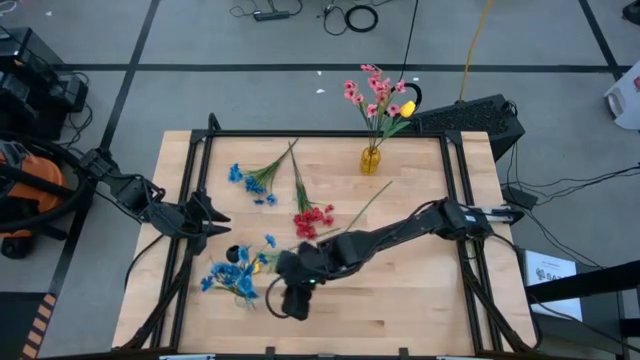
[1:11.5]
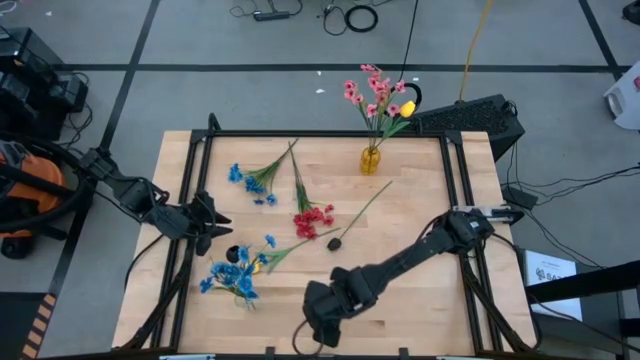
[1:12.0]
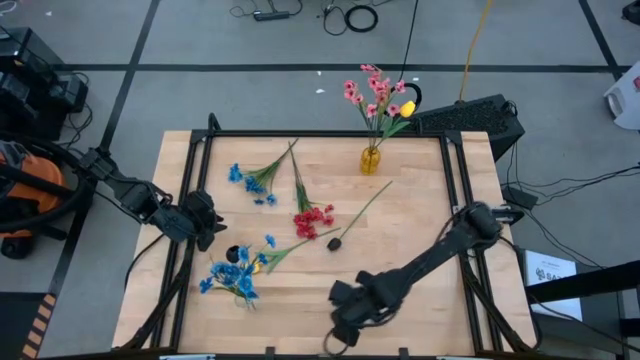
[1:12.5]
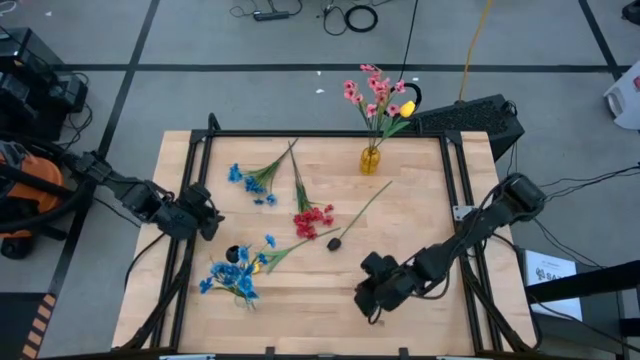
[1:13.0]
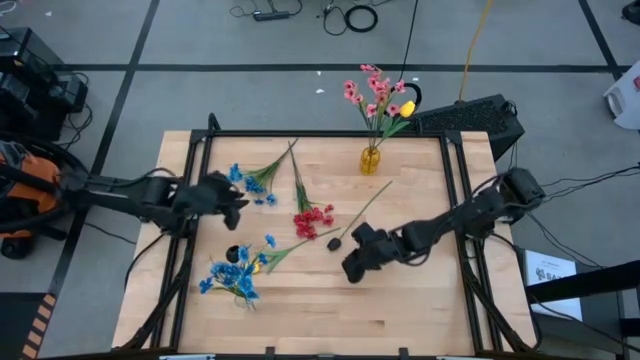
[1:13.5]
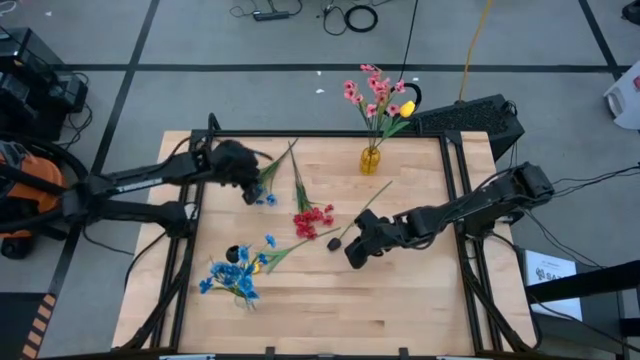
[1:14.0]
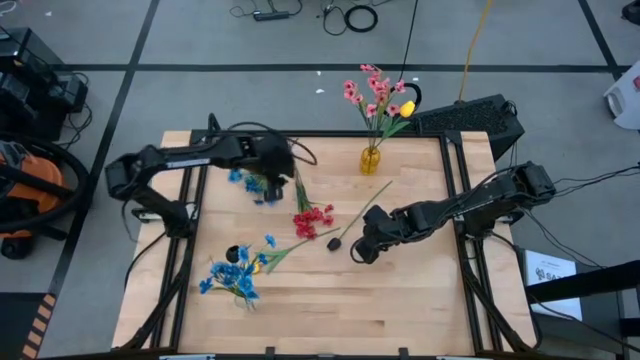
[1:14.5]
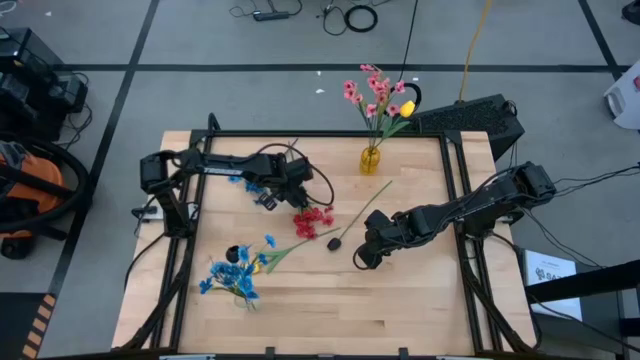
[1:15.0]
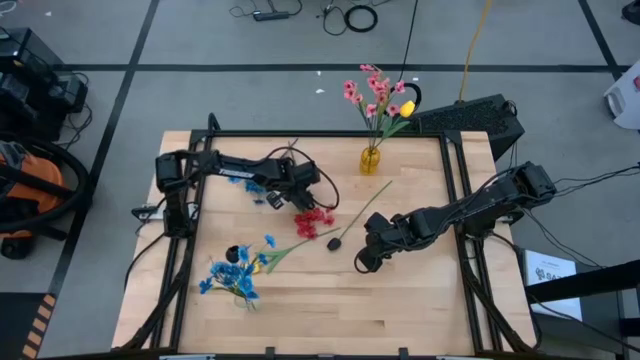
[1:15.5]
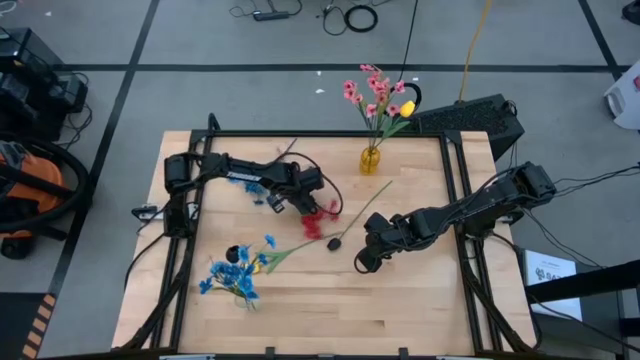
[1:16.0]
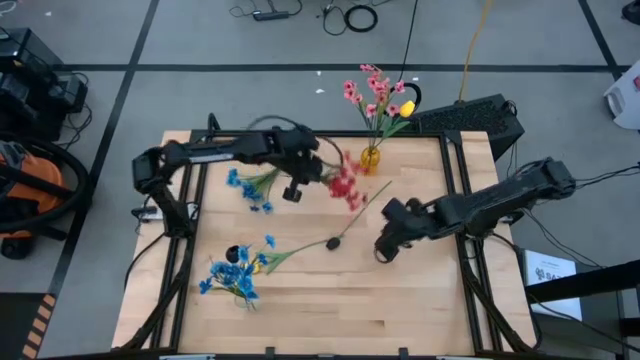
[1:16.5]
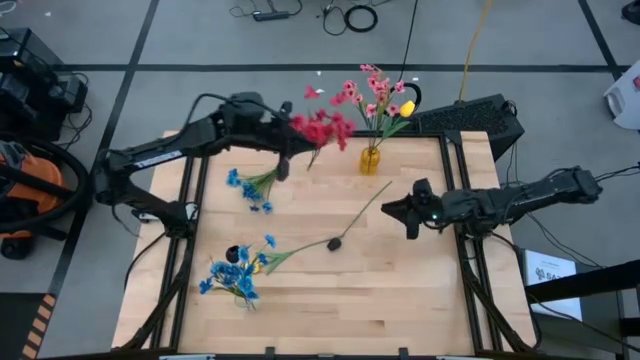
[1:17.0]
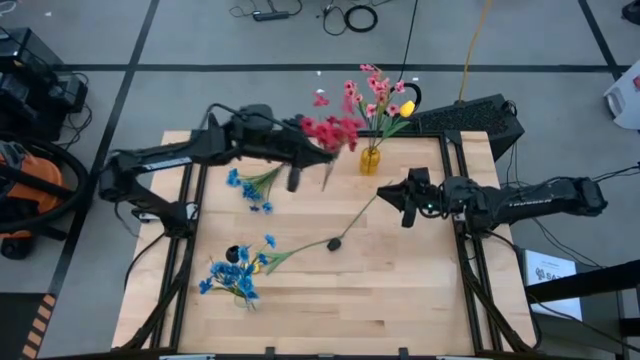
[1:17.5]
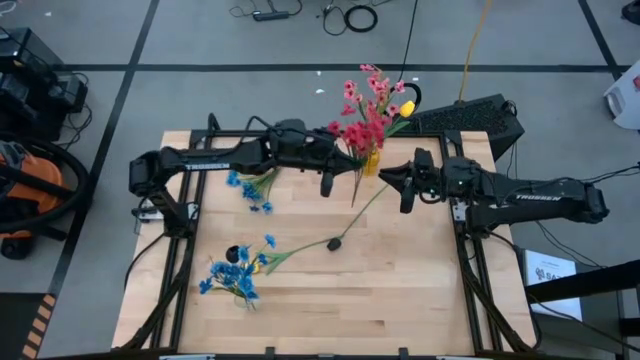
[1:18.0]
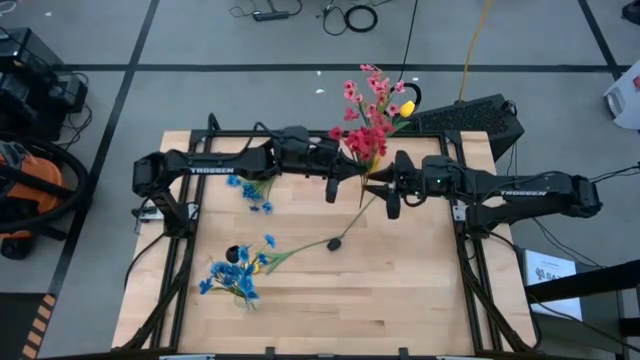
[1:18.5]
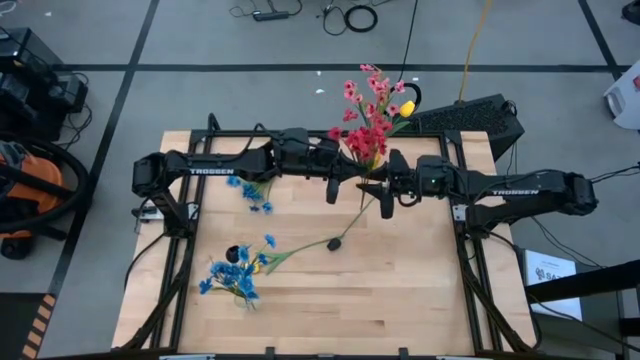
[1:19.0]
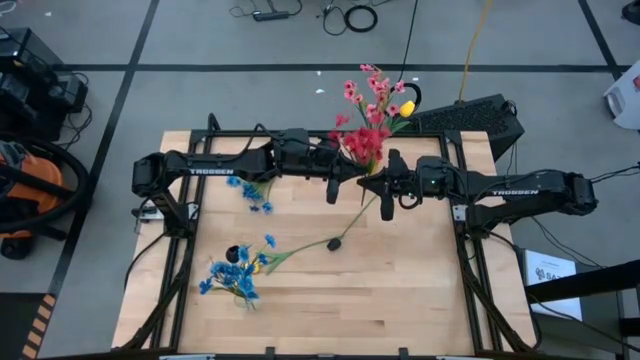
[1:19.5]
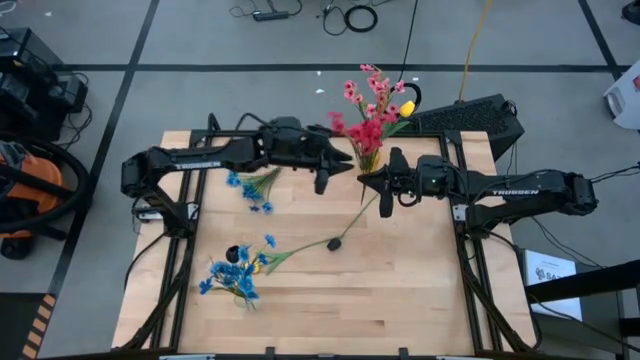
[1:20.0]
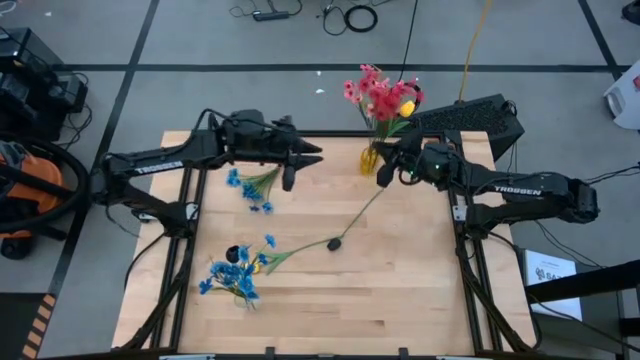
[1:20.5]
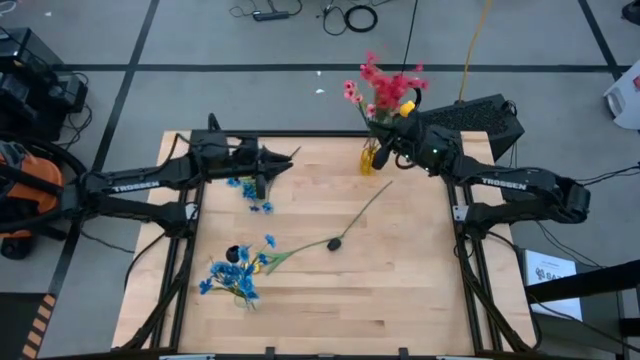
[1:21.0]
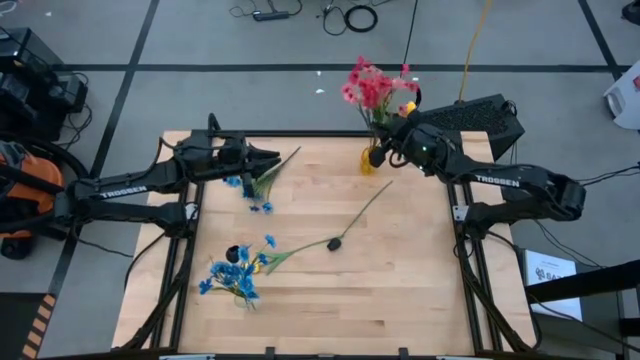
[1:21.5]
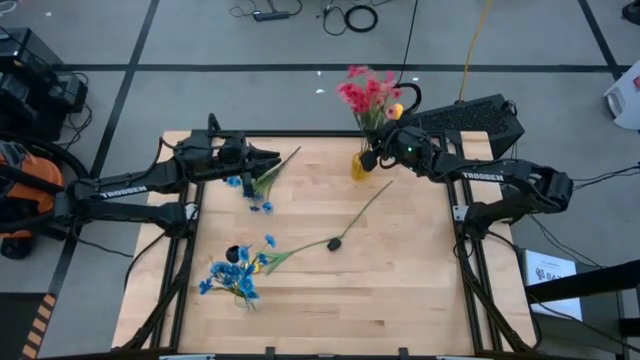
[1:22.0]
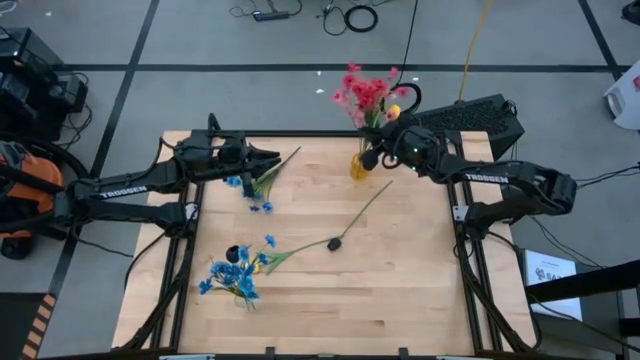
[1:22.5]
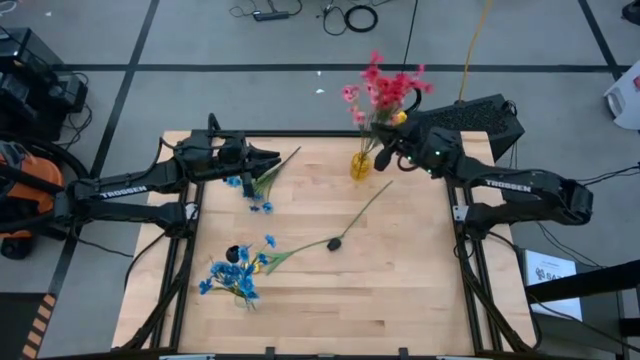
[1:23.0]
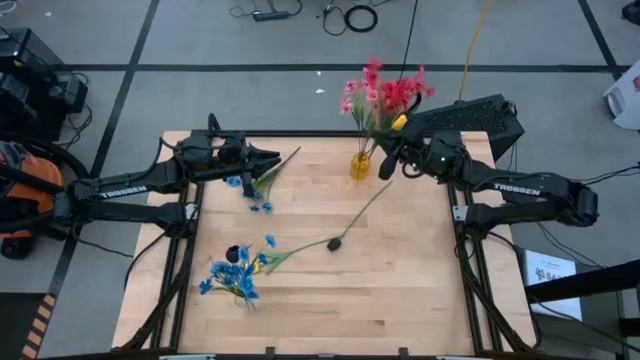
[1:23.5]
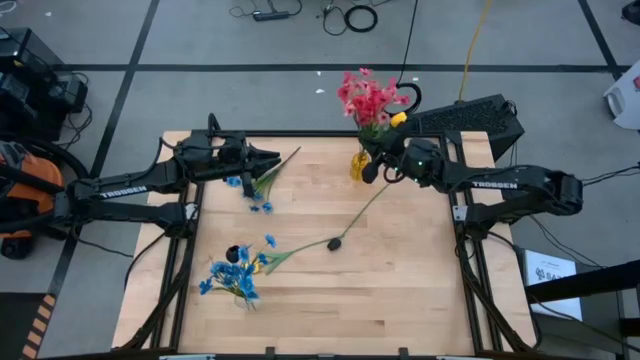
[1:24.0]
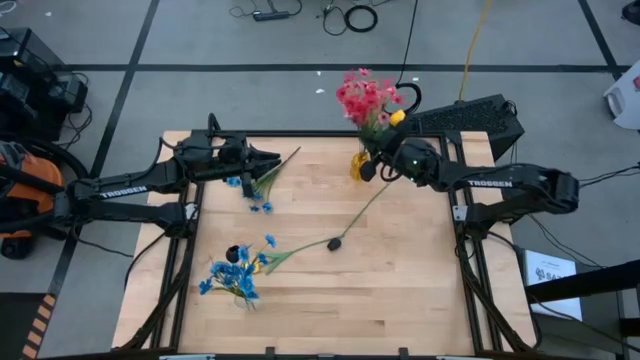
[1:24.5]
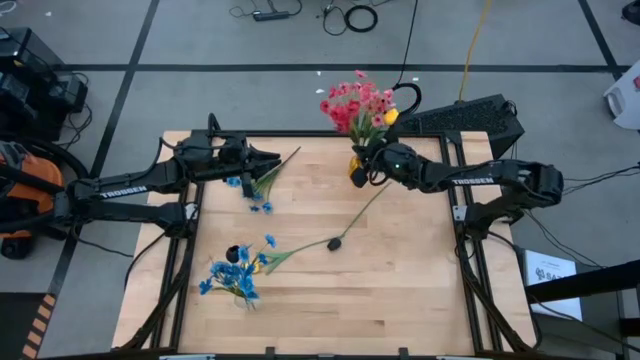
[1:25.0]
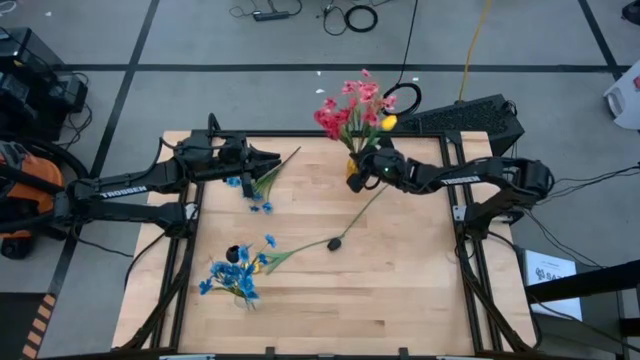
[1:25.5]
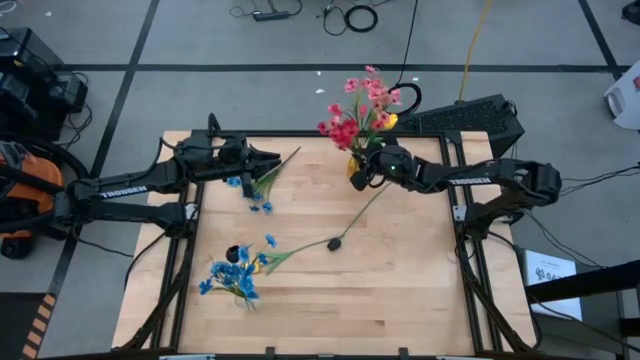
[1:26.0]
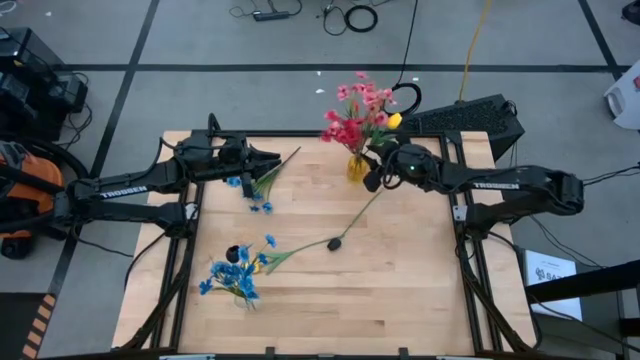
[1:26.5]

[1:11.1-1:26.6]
Task: Sort flowers into vase by color
Put the red flowers into the yellow vase

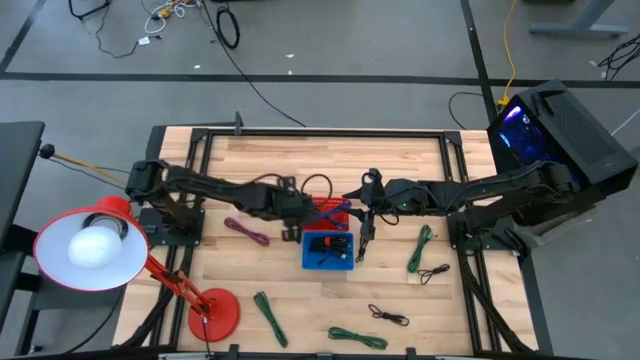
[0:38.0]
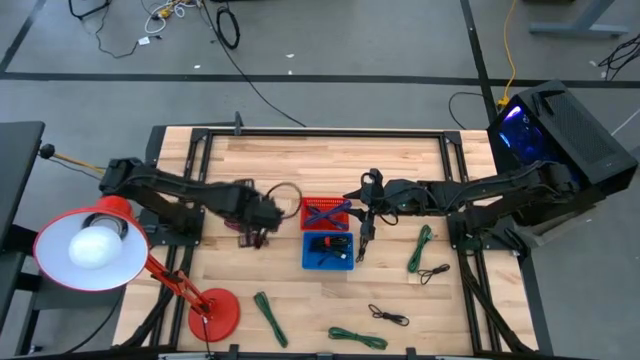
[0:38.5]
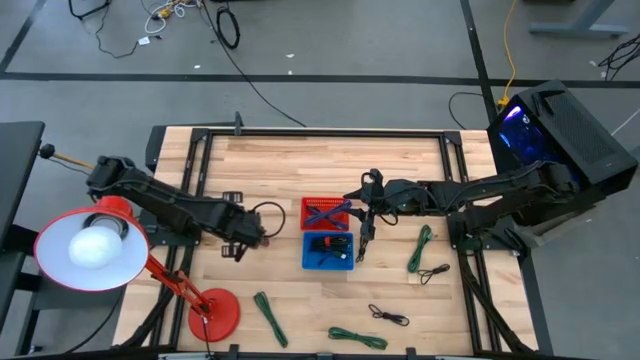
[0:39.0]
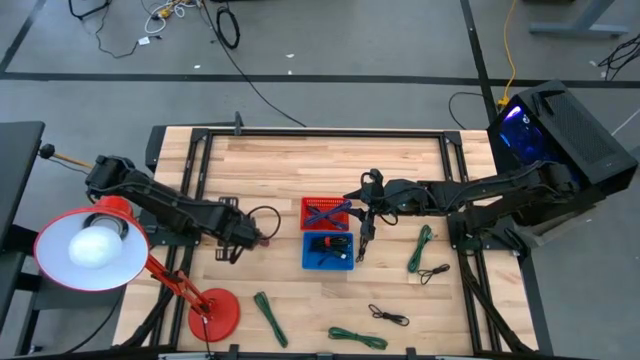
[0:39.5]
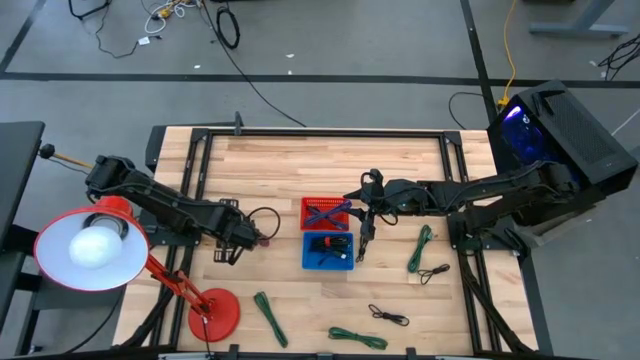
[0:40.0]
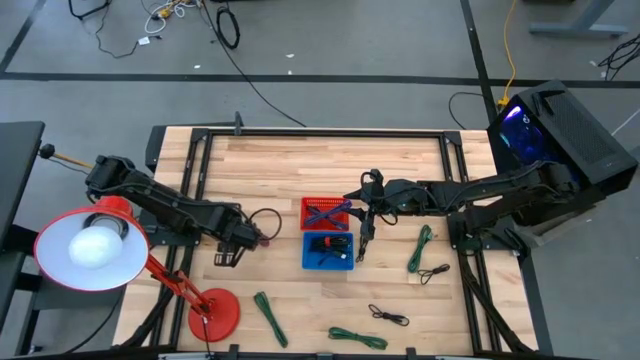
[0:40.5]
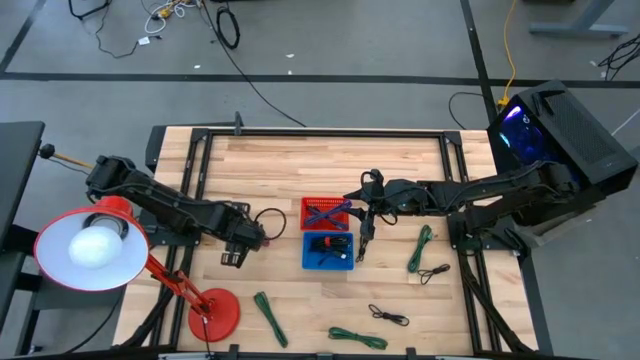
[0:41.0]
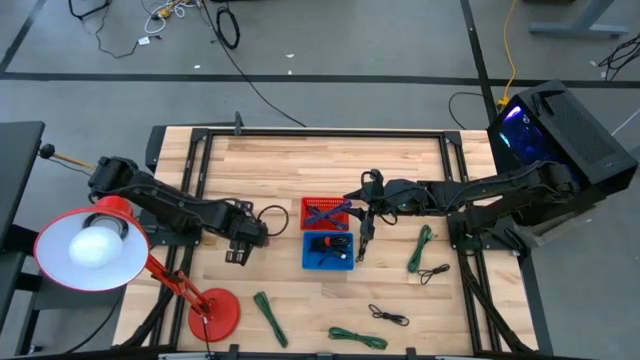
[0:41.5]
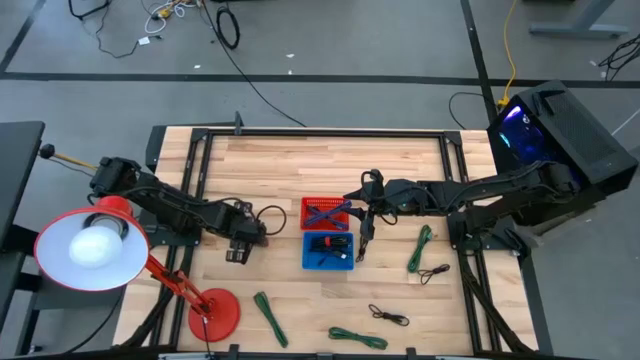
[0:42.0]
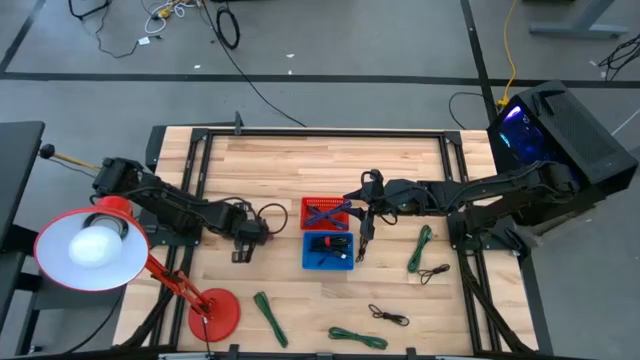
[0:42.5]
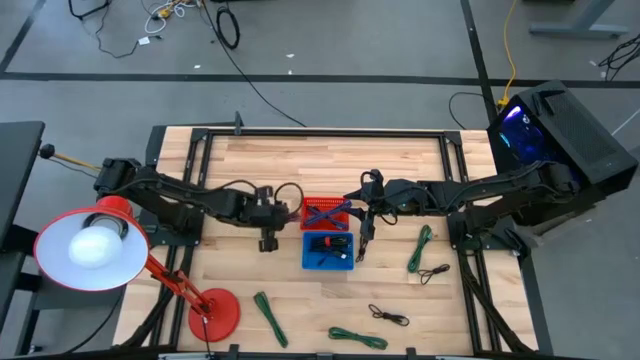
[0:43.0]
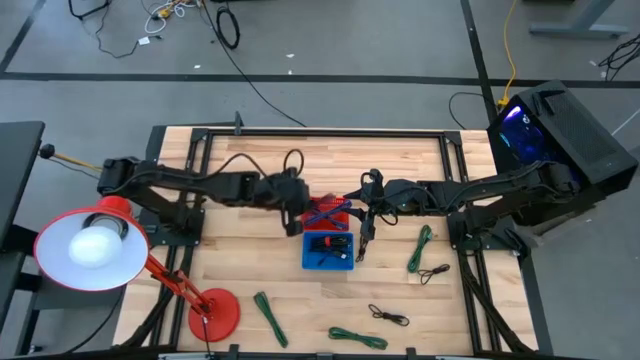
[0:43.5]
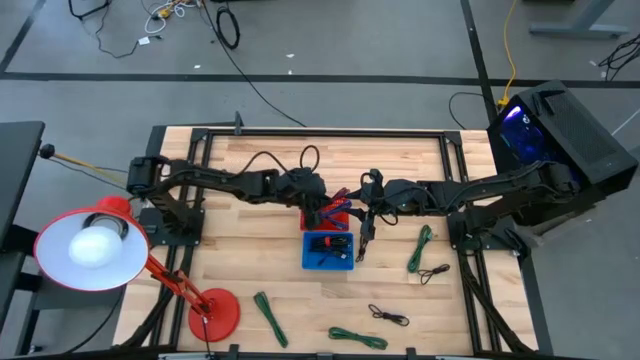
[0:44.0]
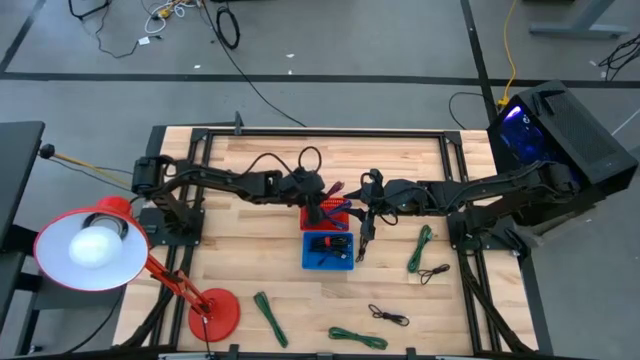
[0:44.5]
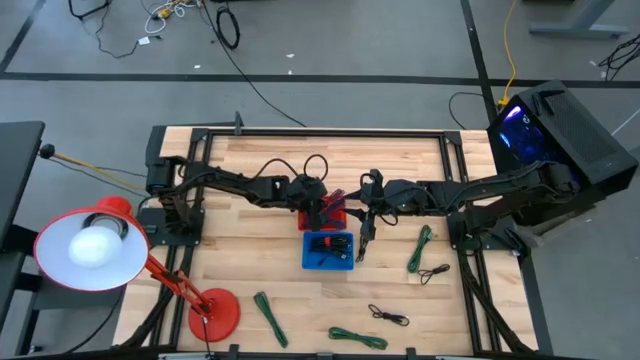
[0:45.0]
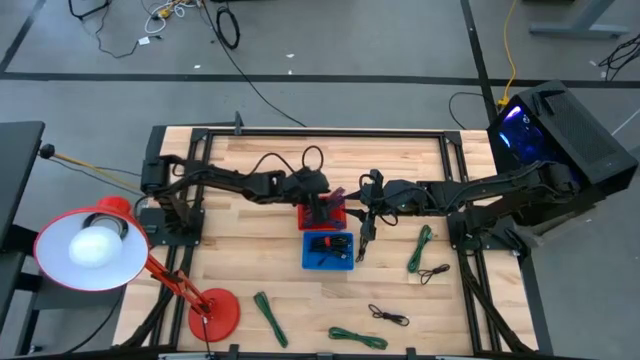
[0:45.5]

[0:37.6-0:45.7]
Task: Pick & Place USB Port
Put the red charger cable into the red bin
